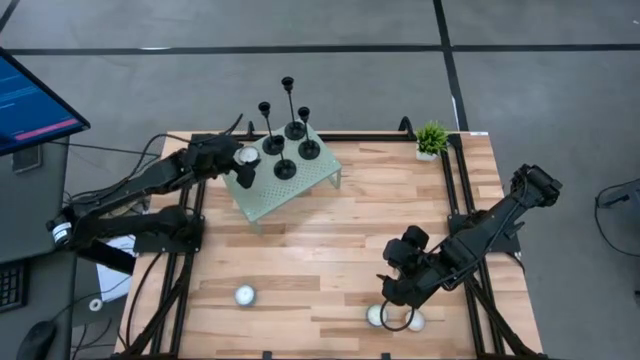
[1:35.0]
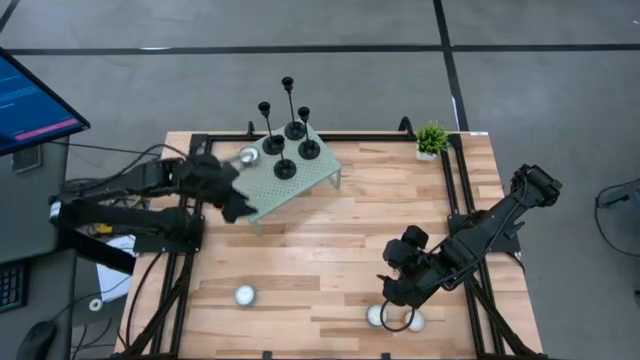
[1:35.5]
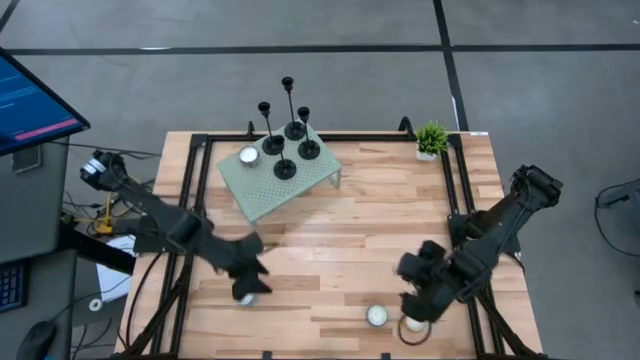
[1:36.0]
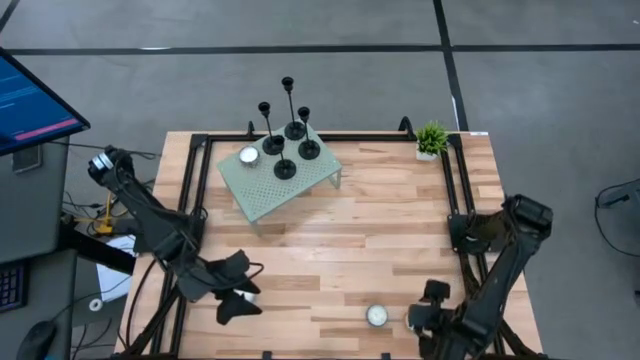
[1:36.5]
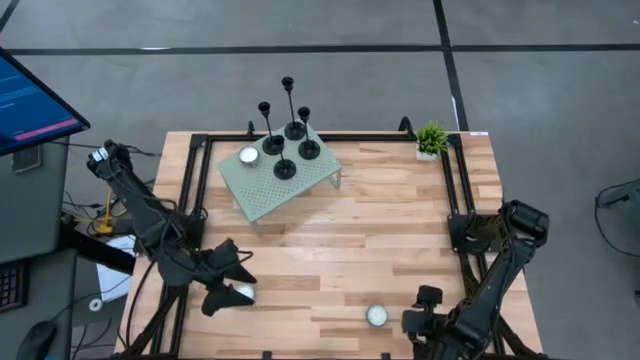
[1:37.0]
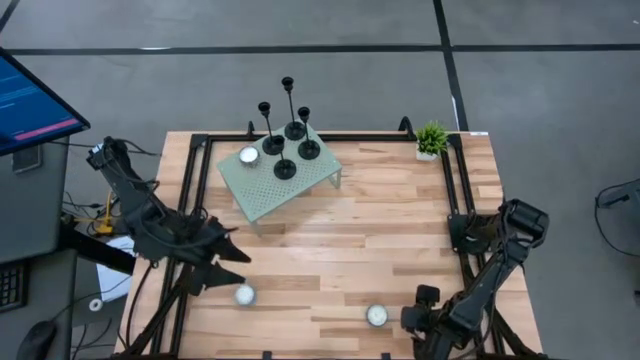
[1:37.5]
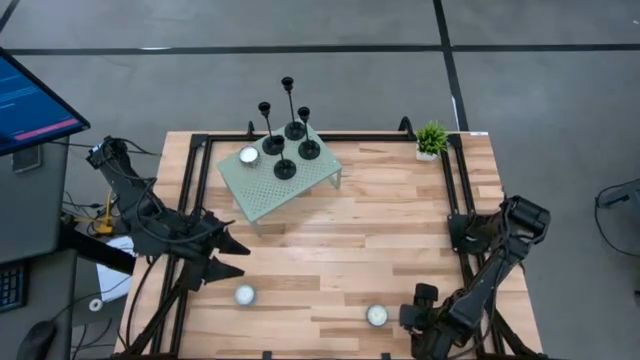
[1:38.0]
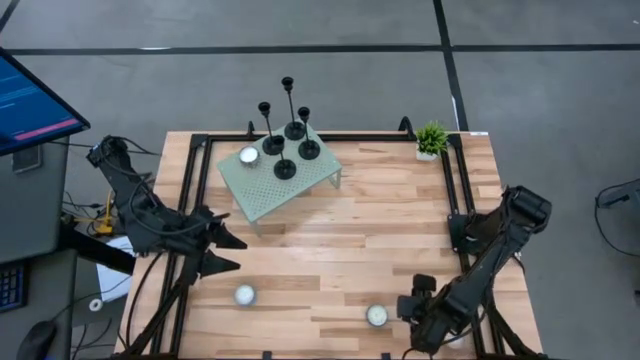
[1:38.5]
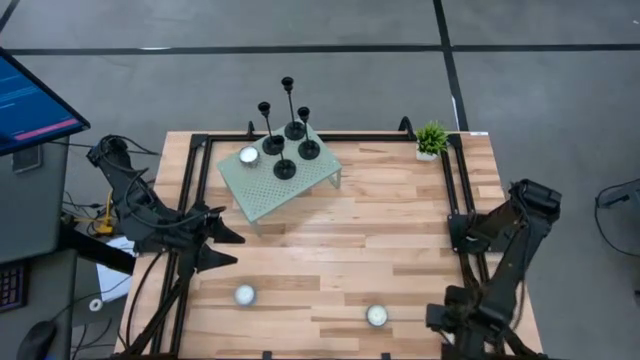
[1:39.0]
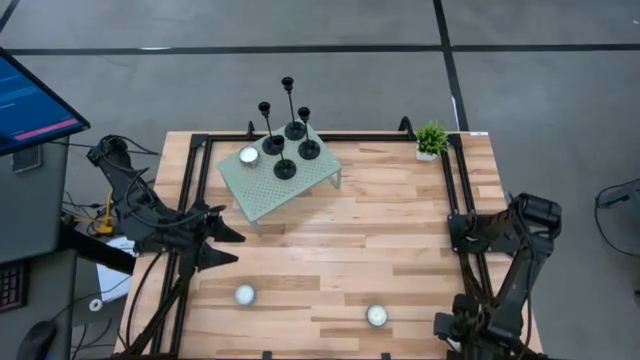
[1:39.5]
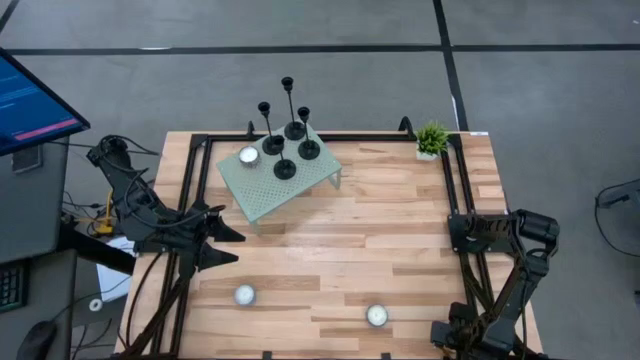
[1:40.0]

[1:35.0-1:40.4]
Task: Pick & Place candle stick holders
Put the orange patterned scented candle on the shelf

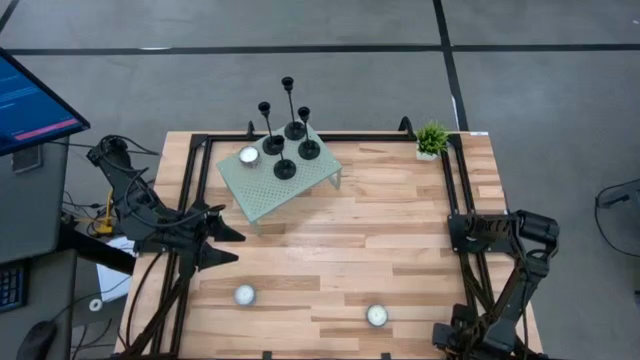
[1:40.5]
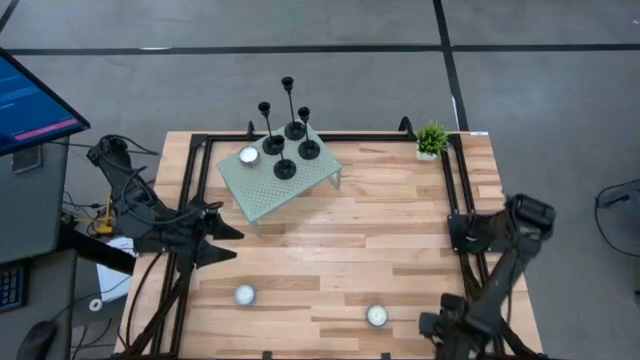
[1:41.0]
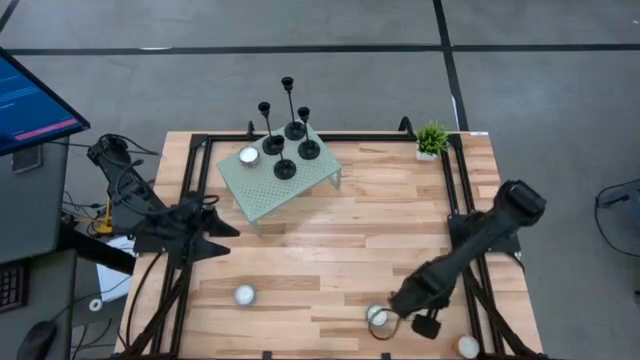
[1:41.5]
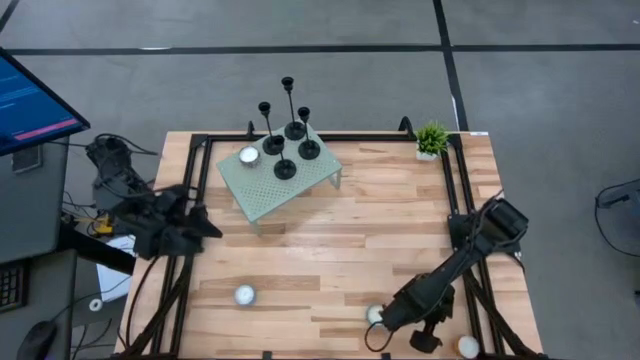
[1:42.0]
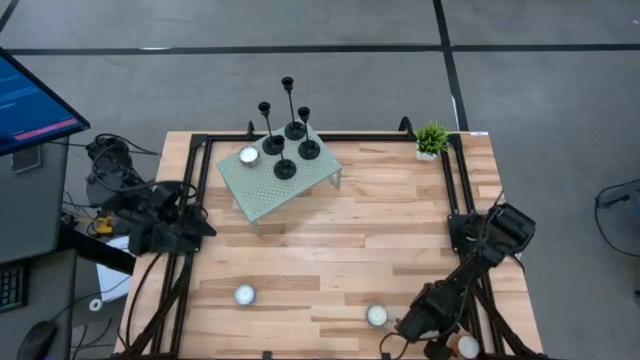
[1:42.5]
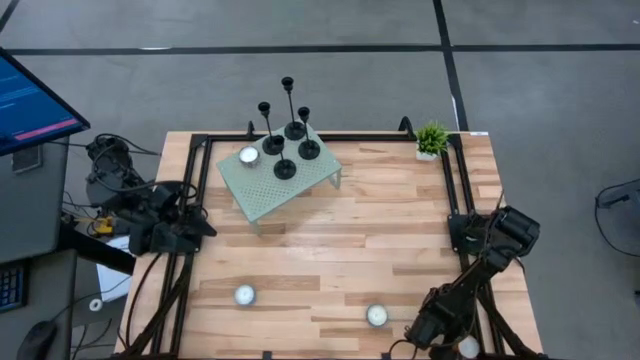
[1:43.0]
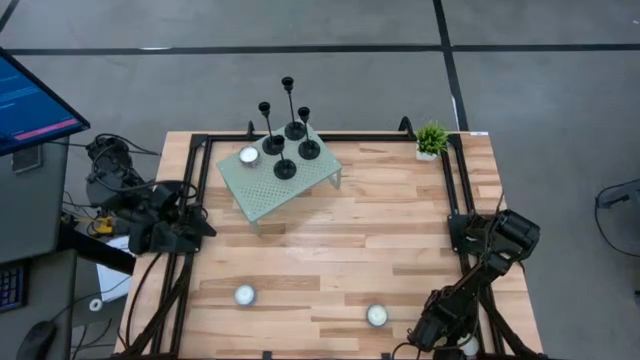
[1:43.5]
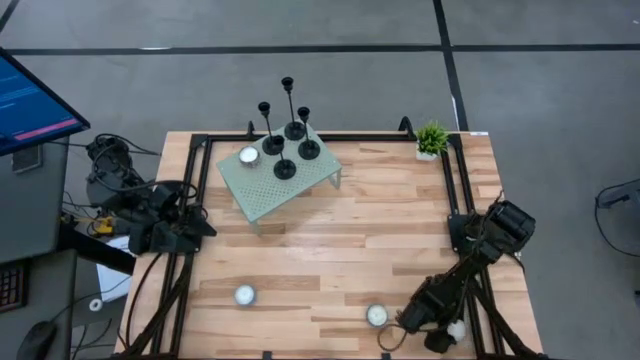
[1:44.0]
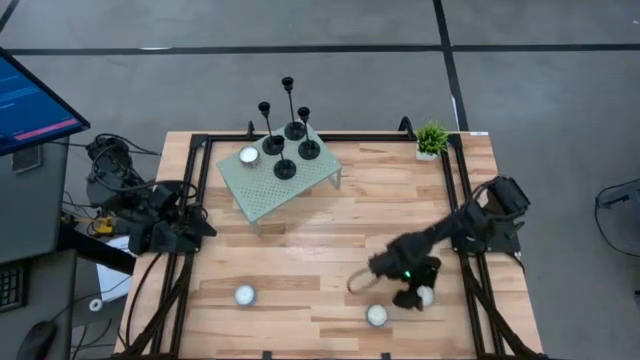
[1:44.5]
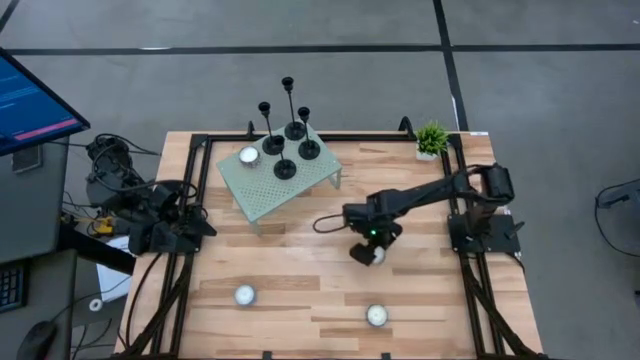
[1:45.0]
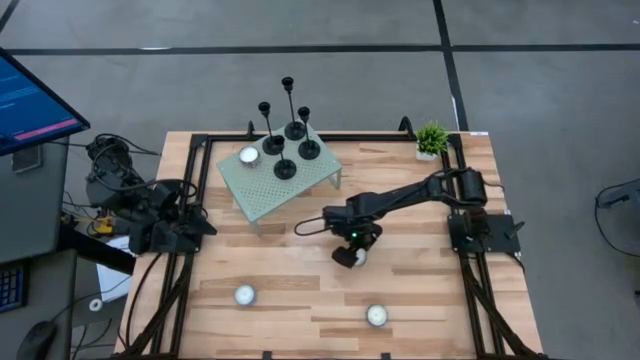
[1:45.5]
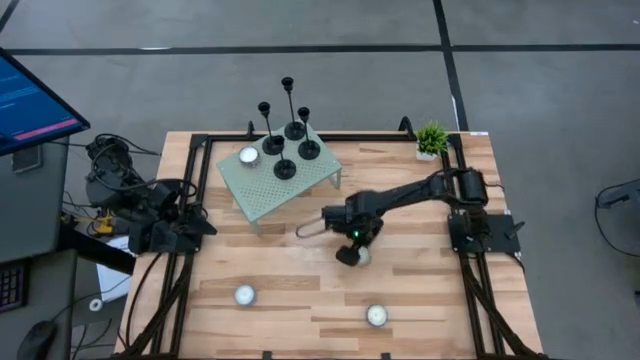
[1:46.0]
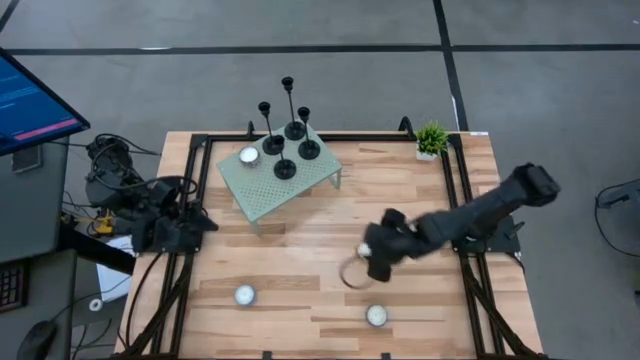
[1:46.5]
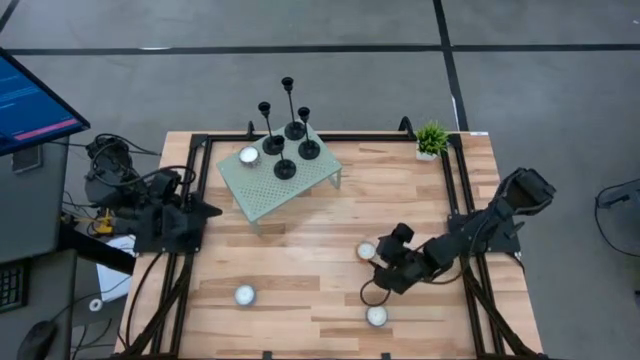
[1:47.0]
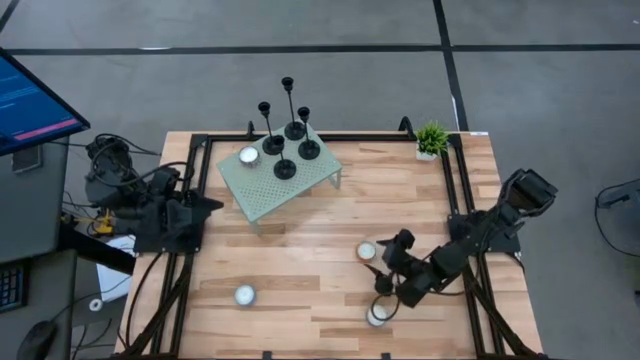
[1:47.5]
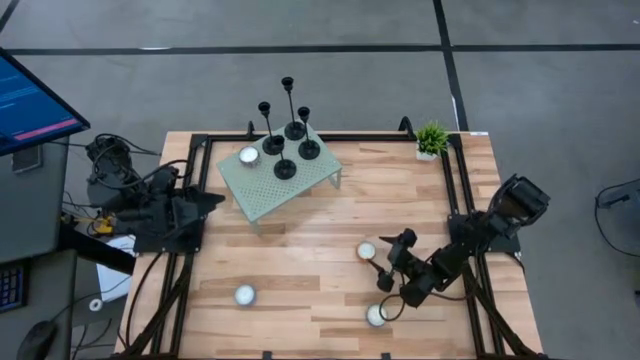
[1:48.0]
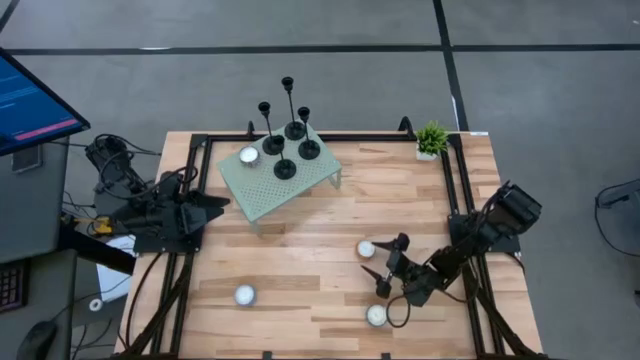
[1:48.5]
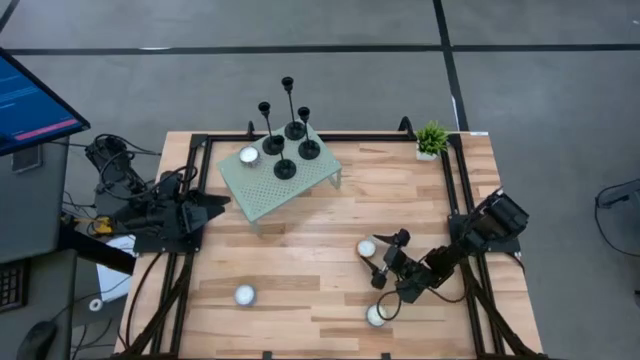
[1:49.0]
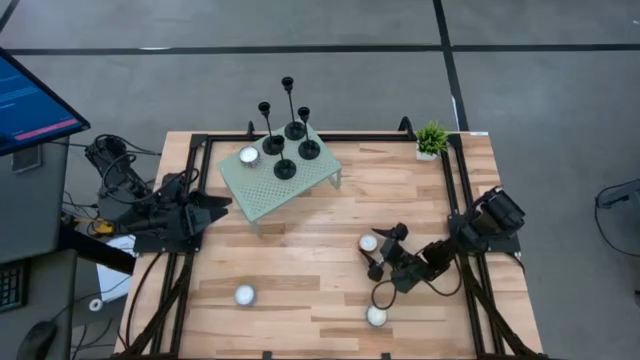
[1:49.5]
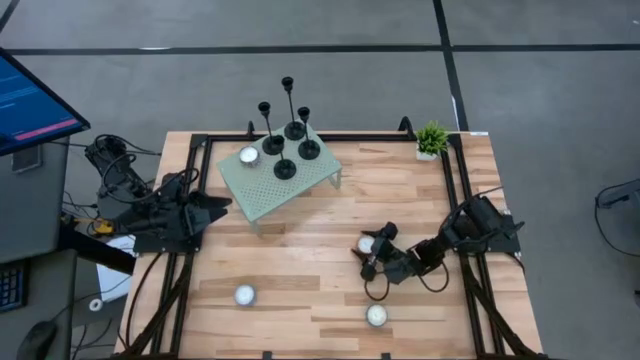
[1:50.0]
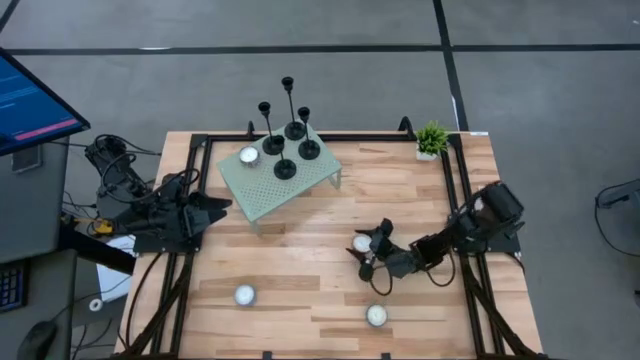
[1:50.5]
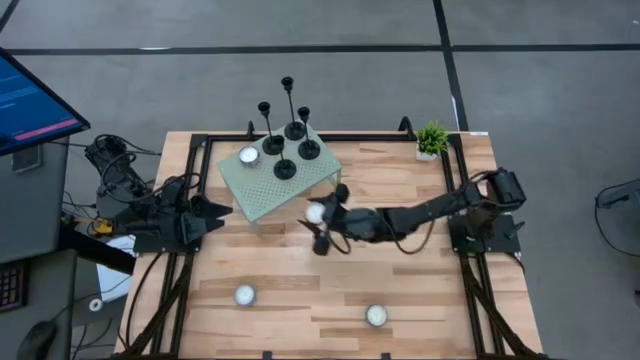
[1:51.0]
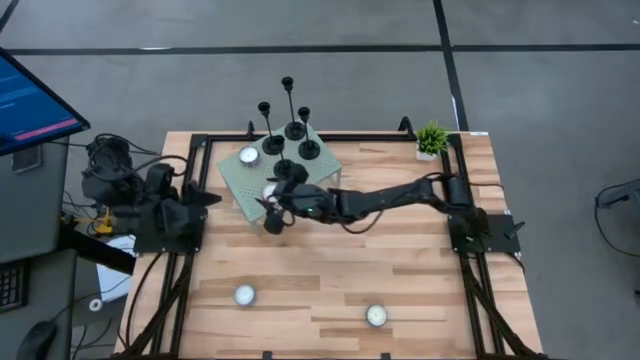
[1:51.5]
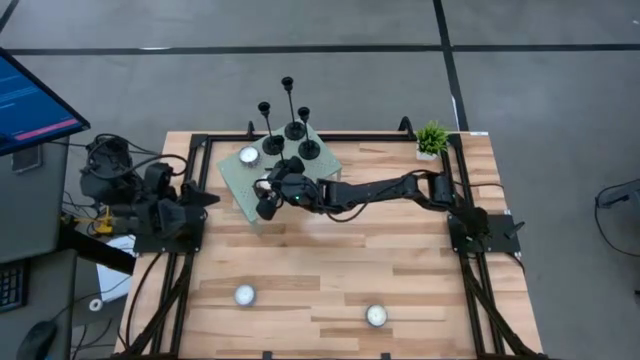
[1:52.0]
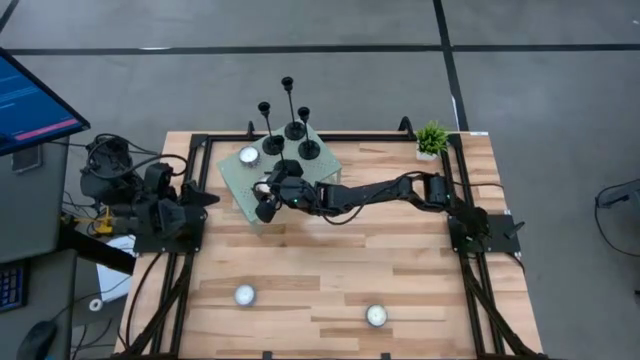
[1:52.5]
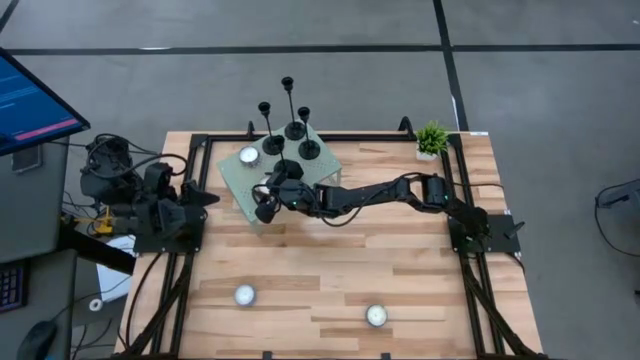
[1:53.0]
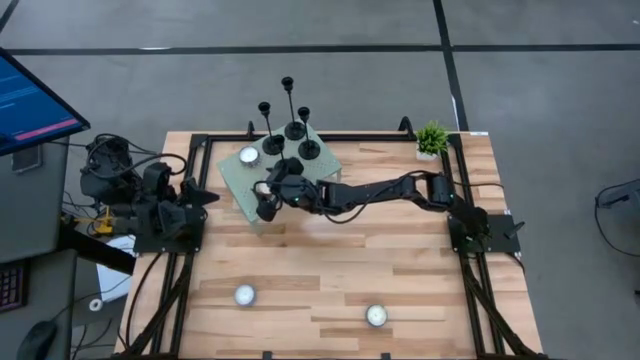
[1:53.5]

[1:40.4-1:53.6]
Put the orange patterned scented candle on the shelf

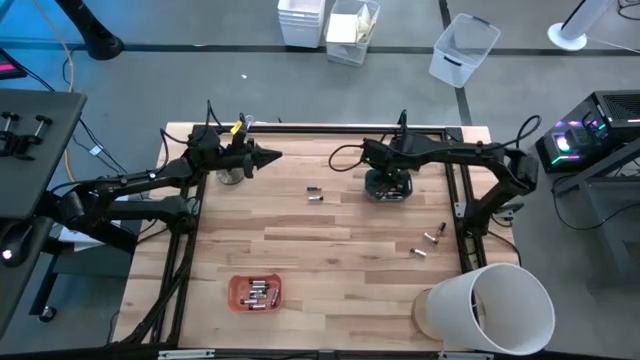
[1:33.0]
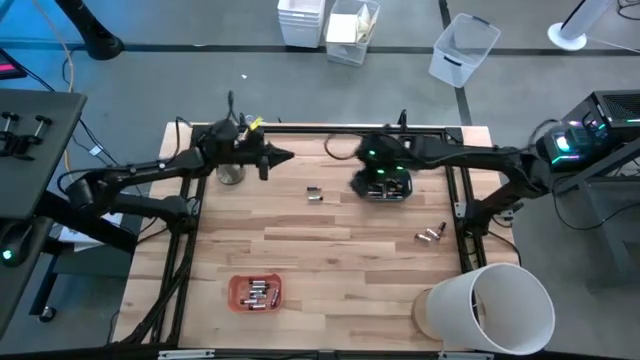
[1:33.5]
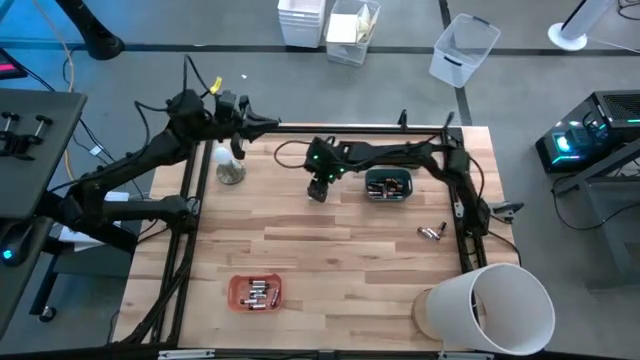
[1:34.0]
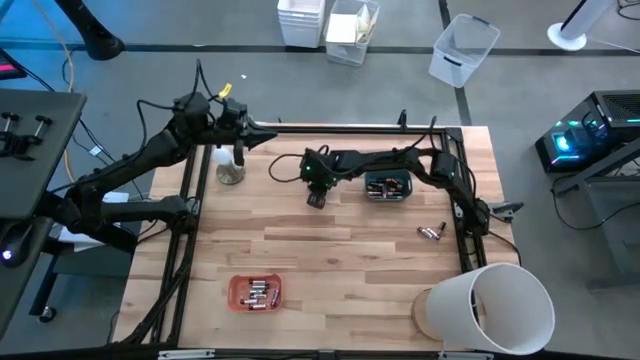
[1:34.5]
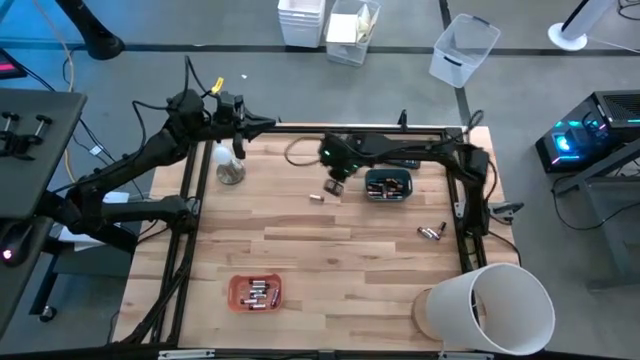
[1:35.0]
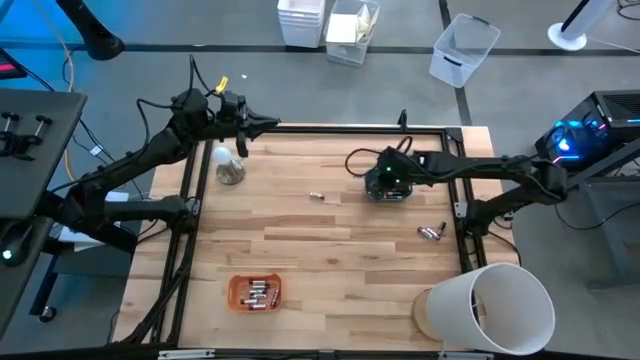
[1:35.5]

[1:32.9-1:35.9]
Task: Sort batteries
Put the black battery into the blue bin
